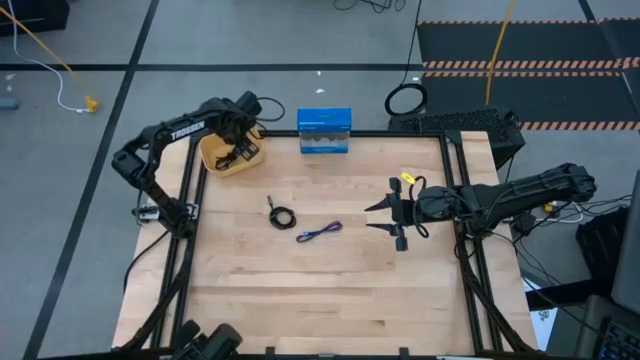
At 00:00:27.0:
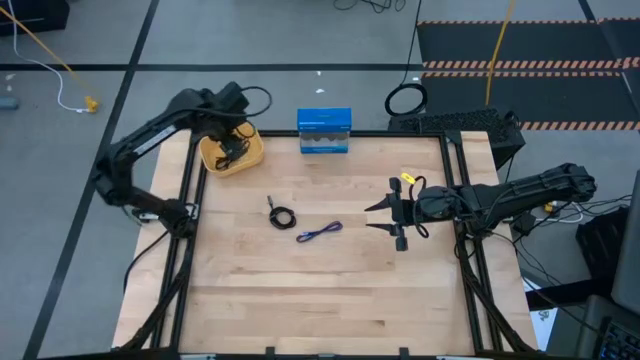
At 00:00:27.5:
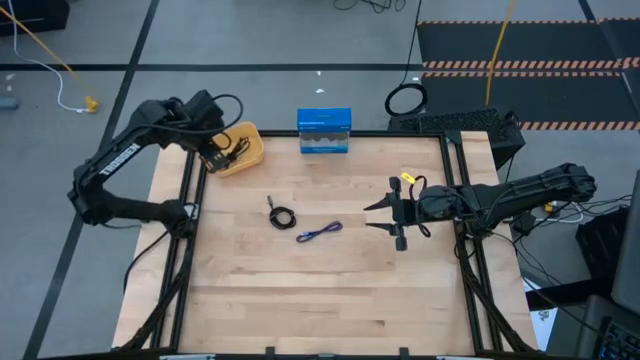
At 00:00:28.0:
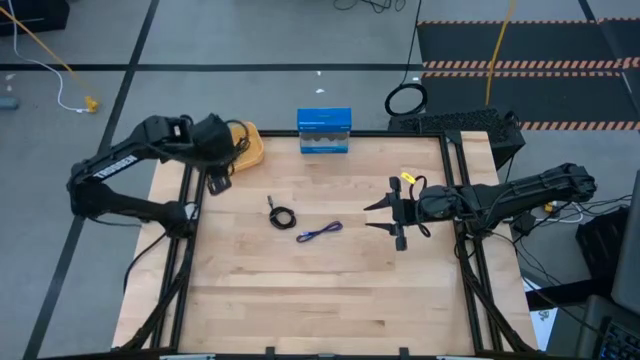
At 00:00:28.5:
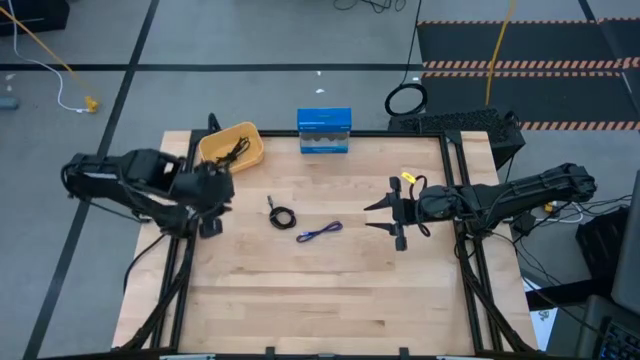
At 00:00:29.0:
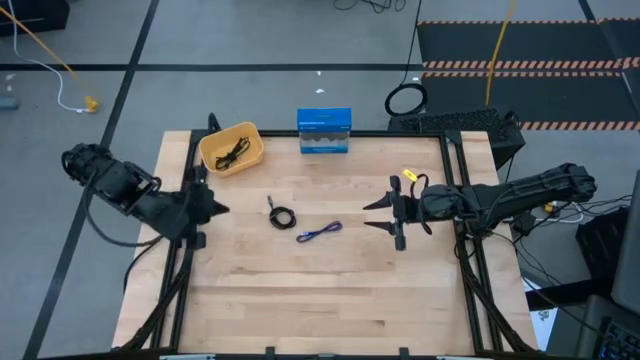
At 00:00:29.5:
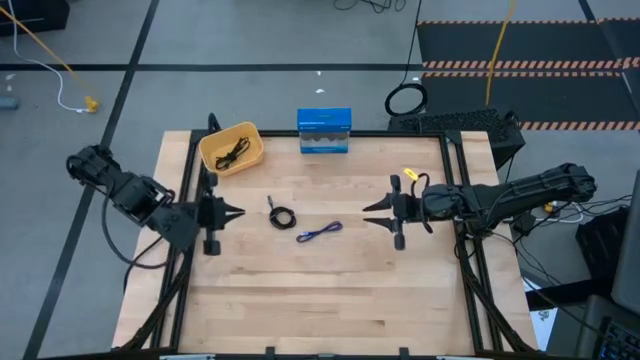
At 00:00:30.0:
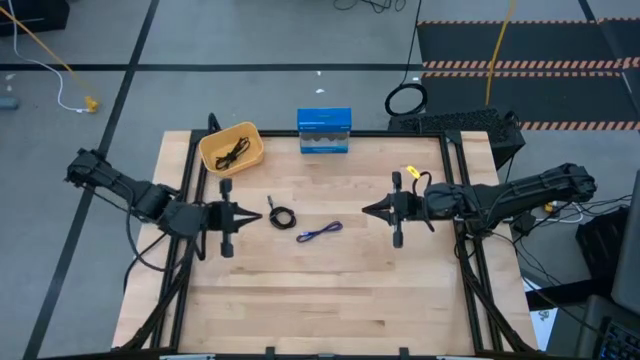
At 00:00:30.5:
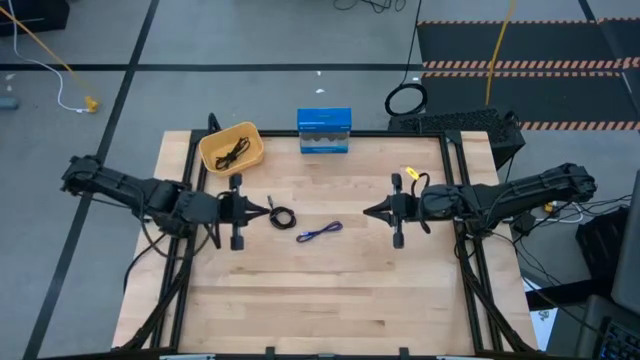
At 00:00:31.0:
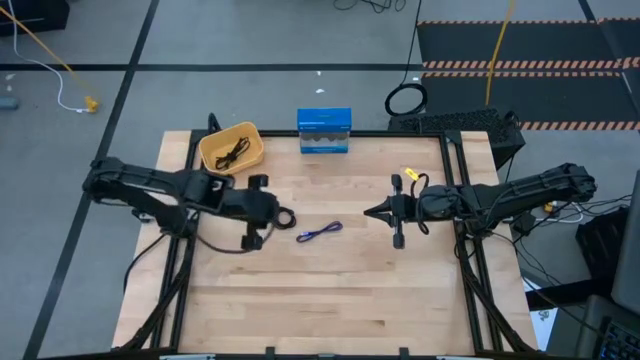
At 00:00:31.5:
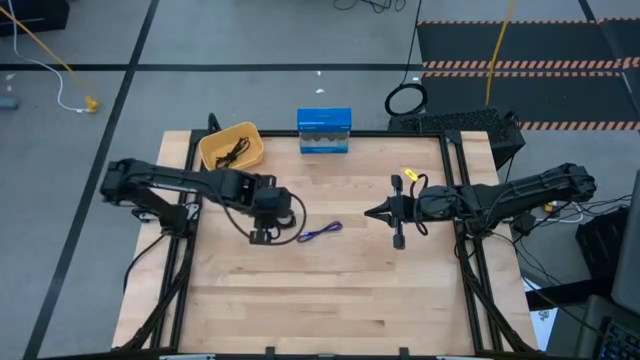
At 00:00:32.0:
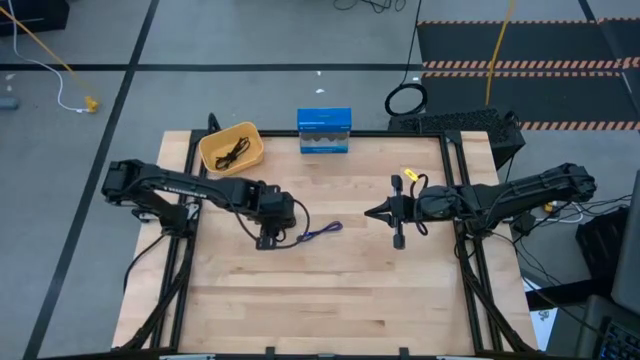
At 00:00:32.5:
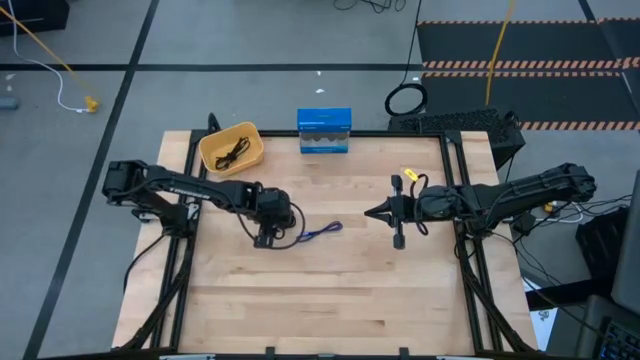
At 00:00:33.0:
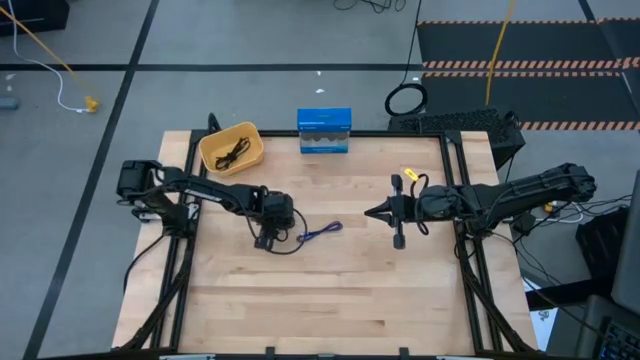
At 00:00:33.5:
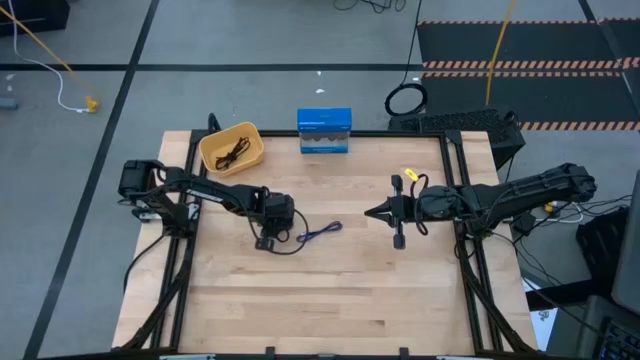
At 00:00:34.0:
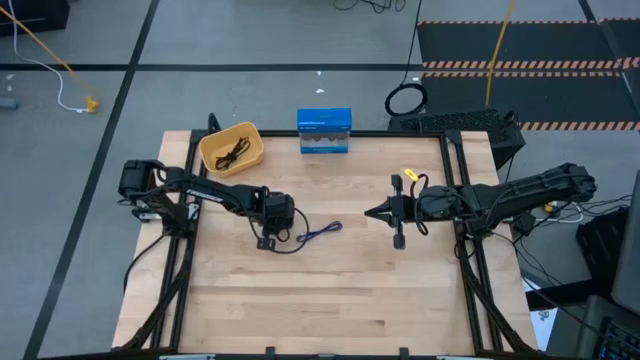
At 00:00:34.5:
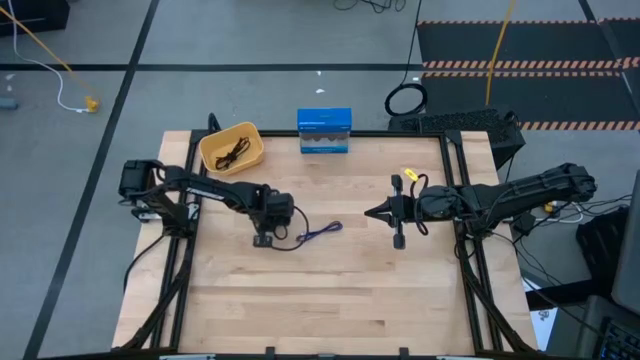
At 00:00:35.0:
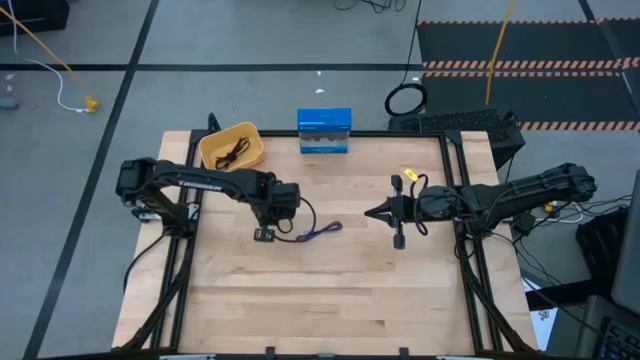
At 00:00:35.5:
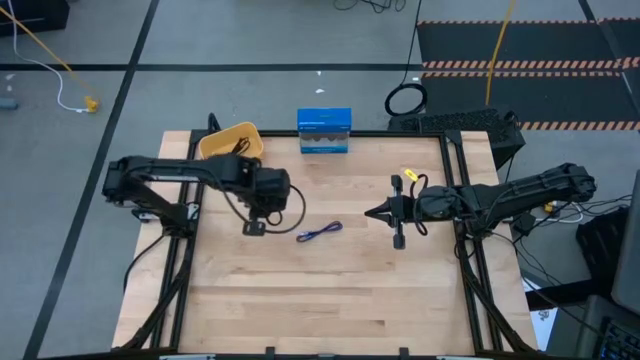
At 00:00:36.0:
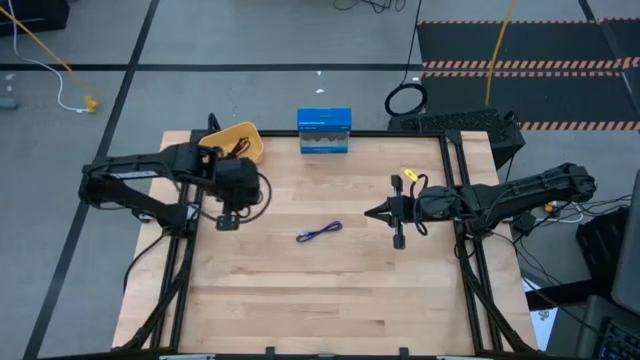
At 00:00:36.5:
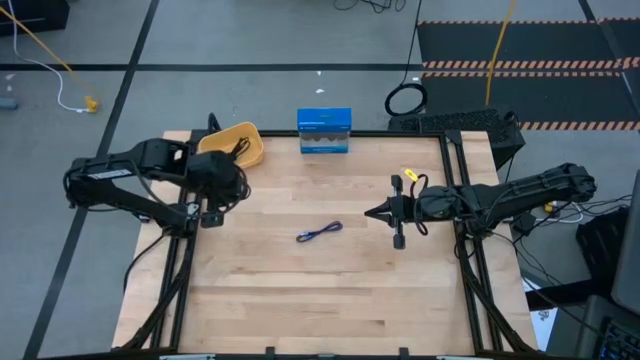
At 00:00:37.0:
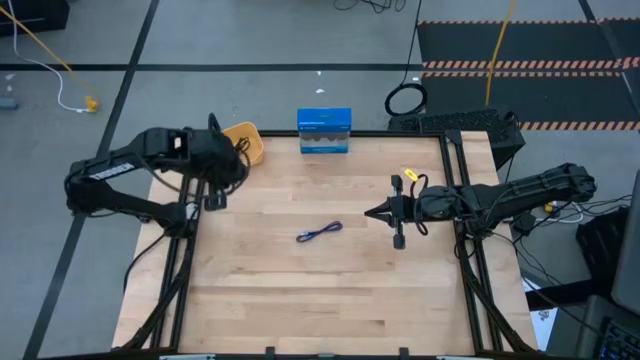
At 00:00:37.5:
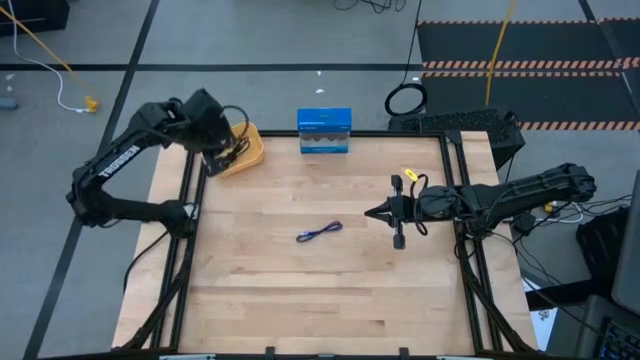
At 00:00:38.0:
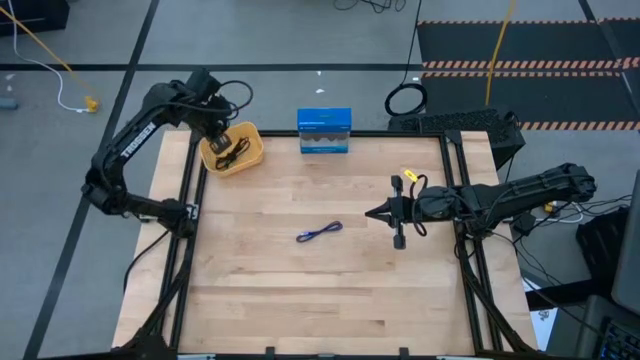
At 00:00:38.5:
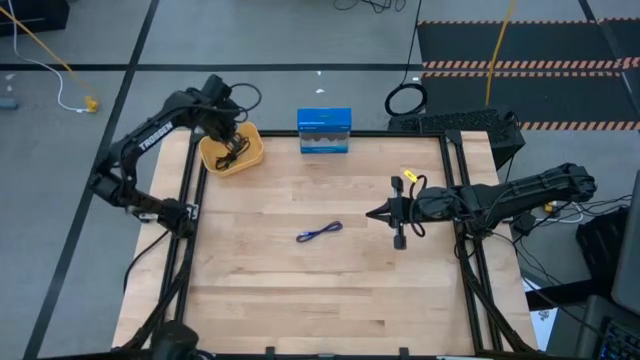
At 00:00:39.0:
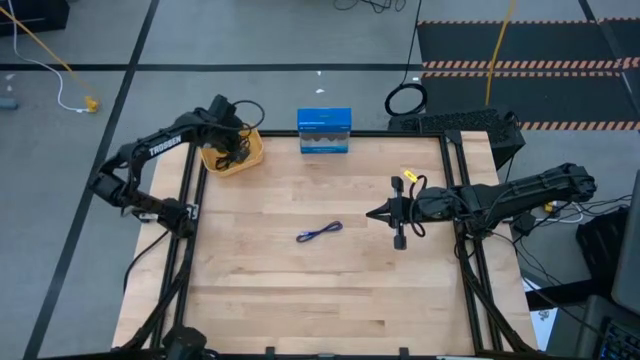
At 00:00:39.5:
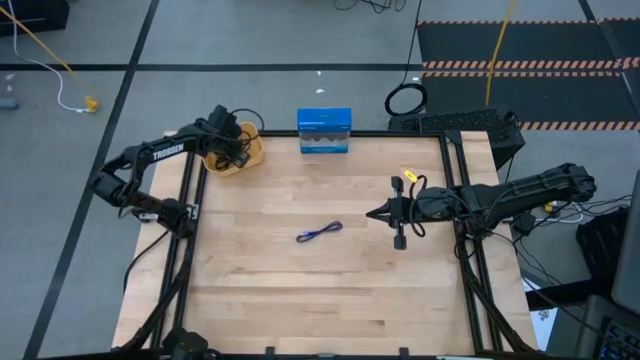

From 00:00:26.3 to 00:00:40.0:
Task: Pick and place USB-C Cables
Put the black charger cable into the yellow bin
